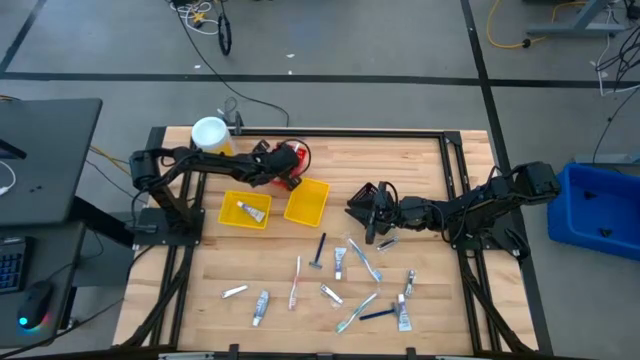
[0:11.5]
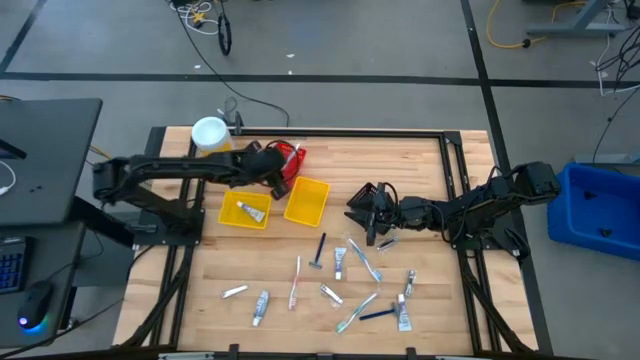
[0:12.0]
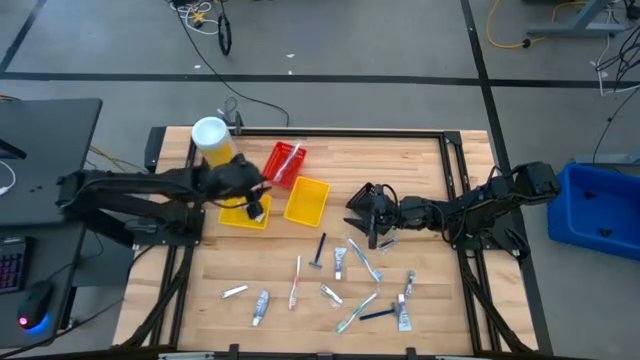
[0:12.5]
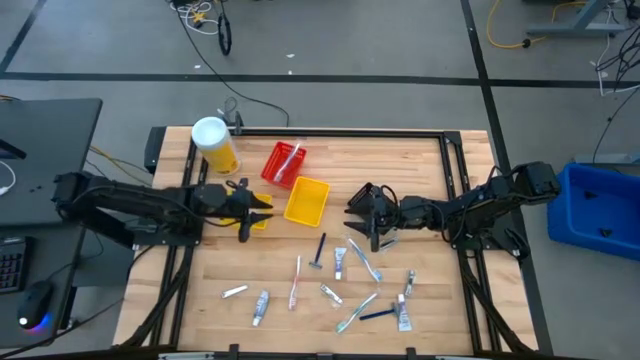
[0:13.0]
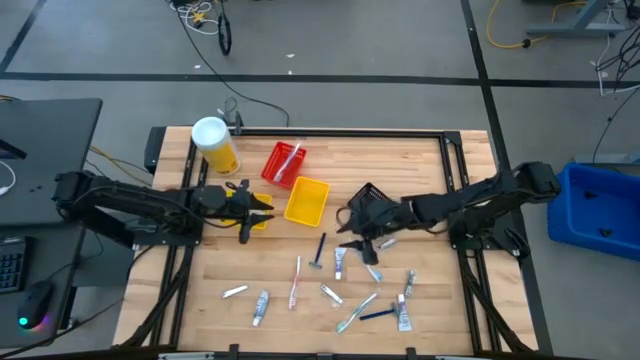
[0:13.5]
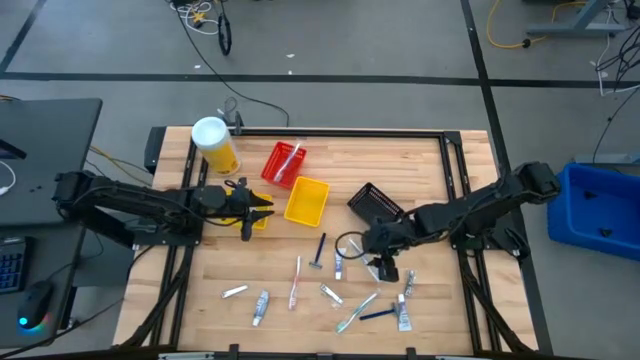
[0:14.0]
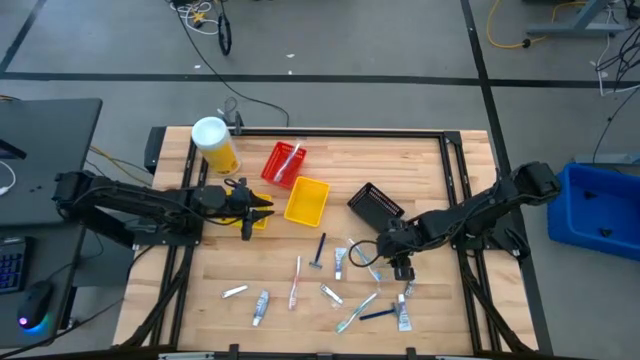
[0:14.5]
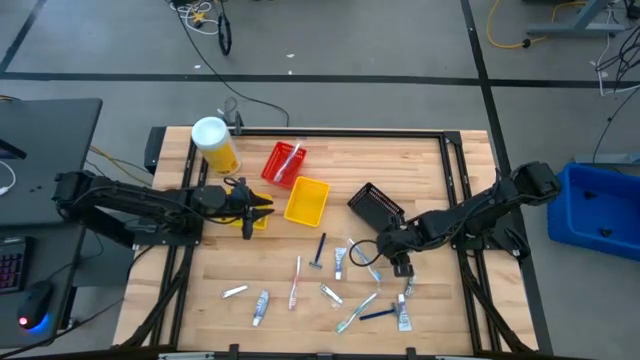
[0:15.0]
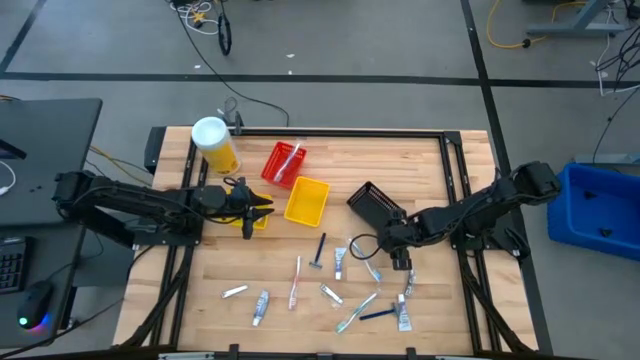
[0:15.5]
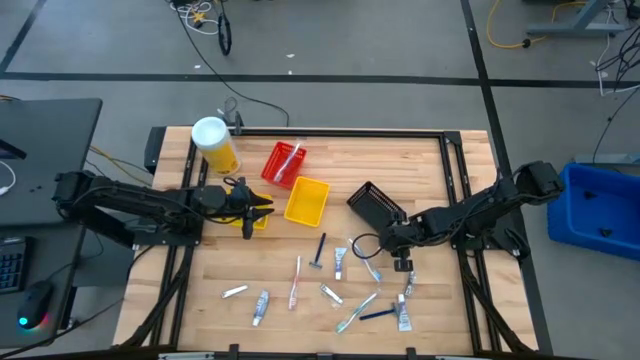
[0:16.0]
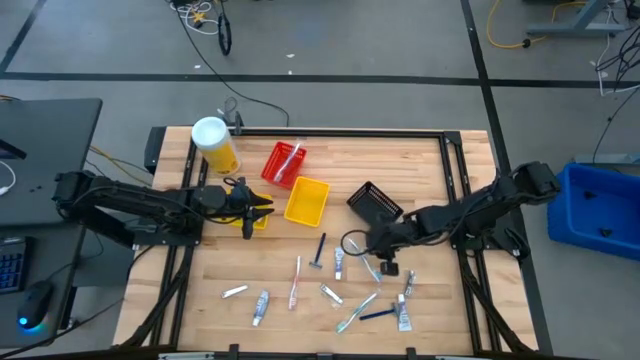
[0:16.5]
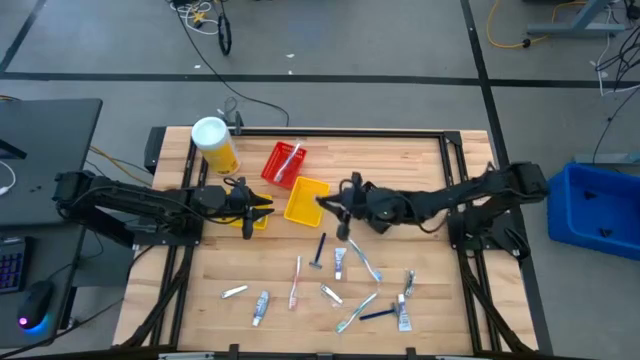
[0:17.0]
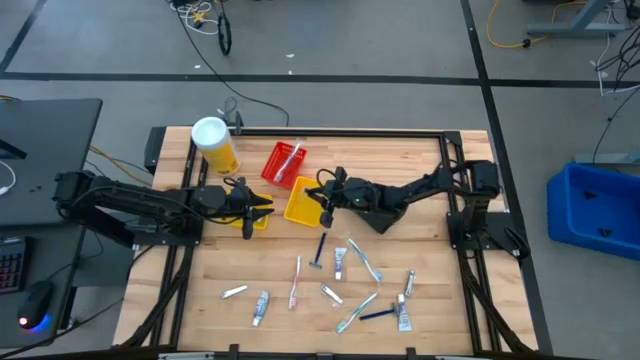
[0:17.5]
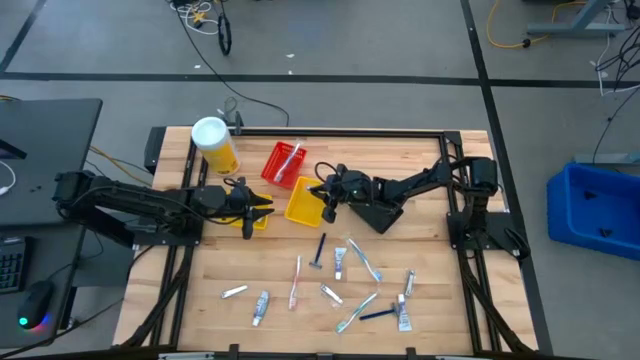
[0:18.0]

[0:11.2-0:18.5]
Task: Pick & Place Travel size toiletries
Put the silver nail cutter into the right yellow bin

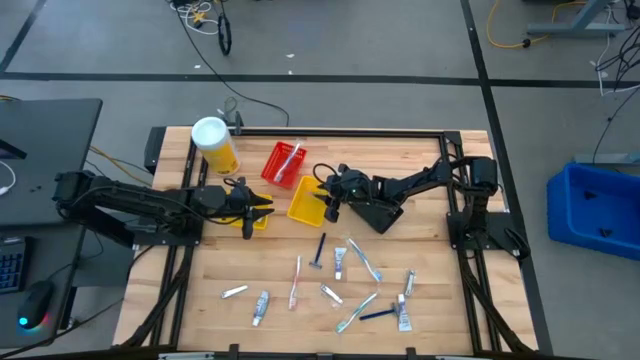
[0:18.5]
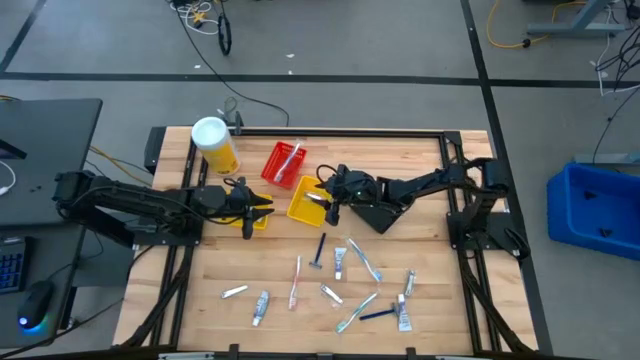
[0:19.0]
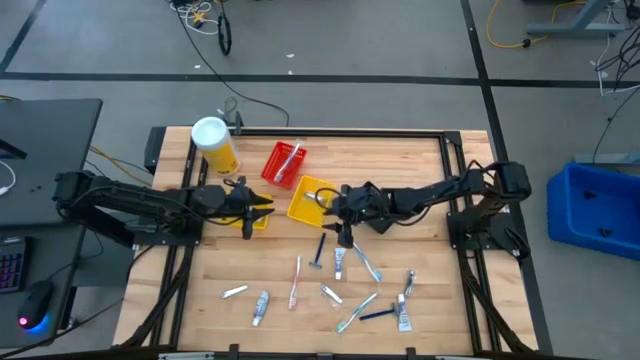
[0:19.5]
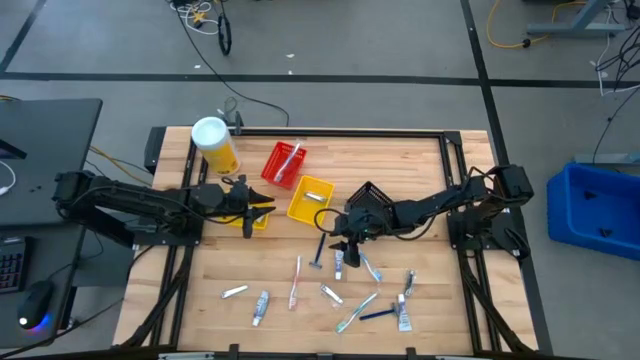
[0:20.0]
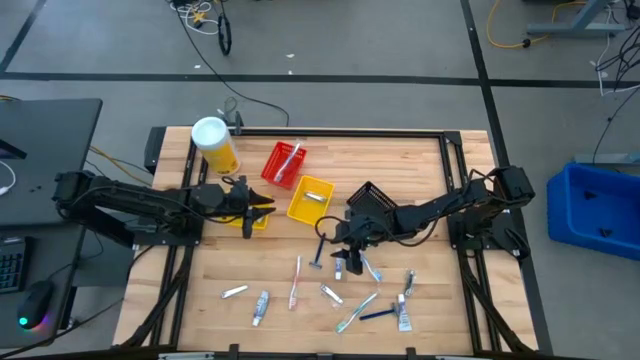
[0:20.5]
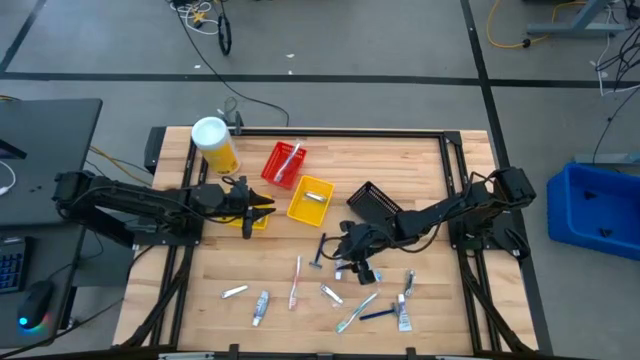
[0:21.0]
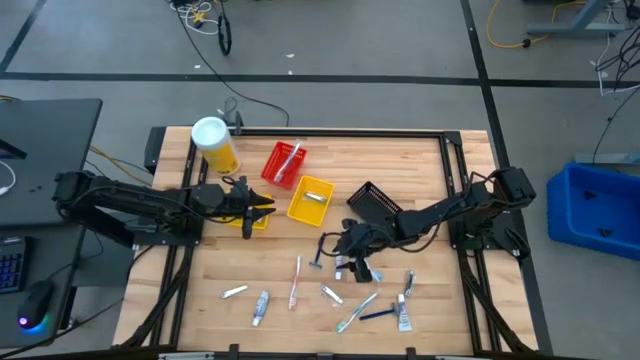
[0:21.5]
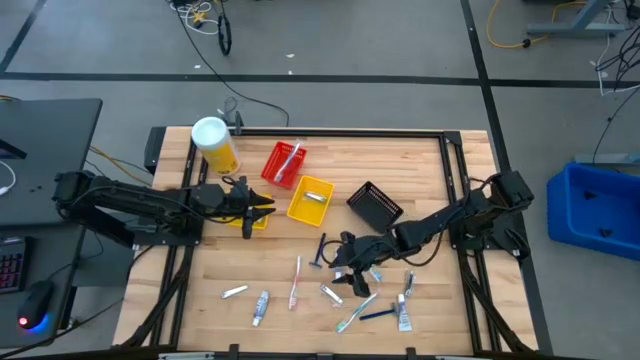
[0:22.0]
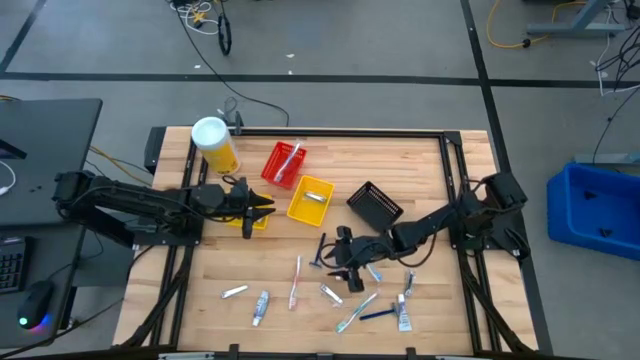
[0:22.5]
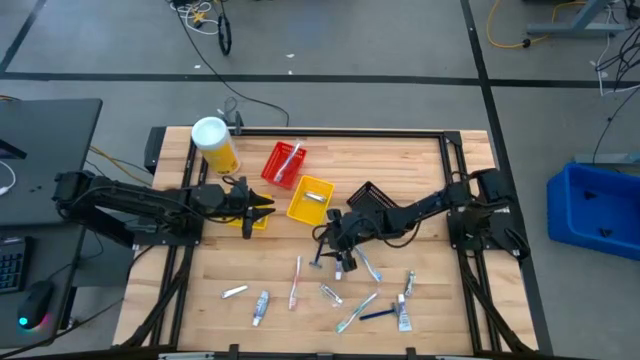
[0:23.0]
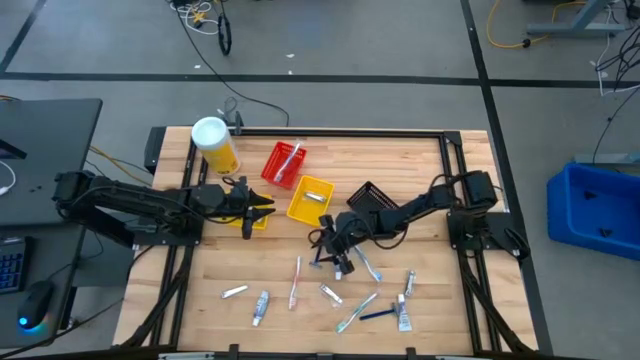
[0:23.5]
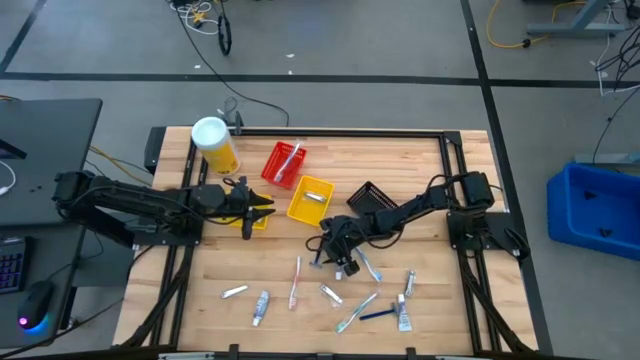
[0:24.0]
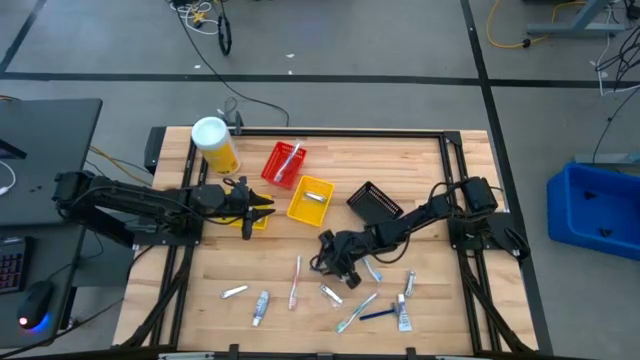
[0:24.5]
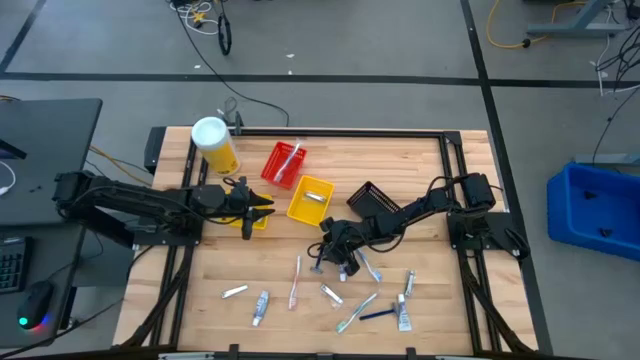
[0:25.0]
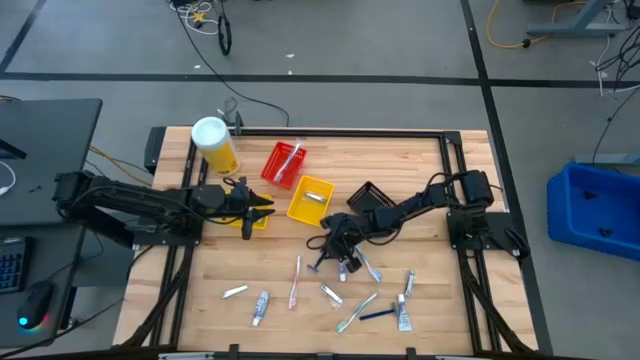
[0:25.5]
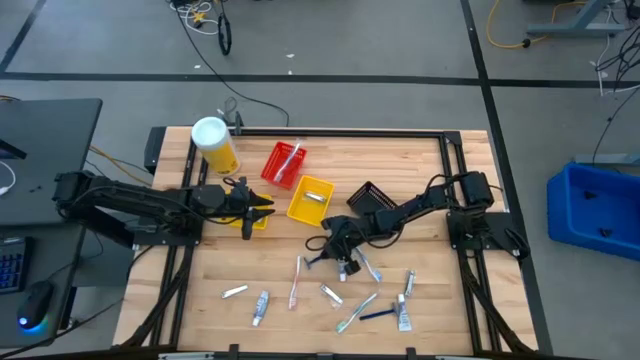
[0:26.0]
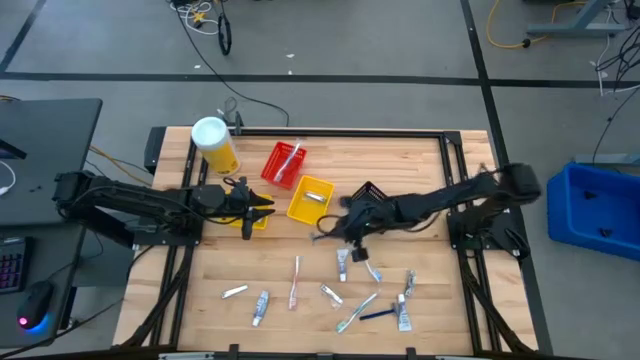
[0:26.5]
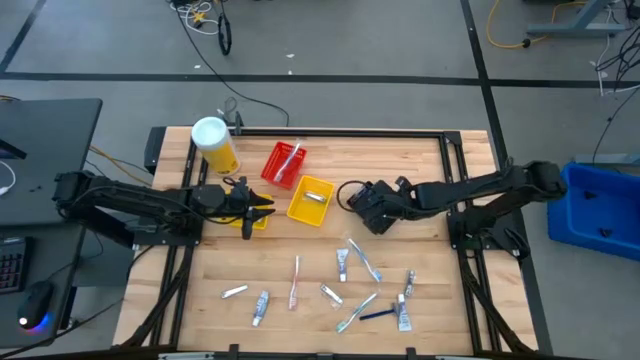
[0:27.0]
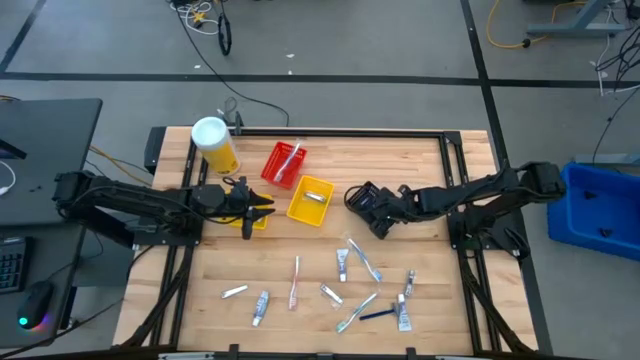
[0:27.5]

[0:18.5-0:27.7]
Put the blue razor into the black bin

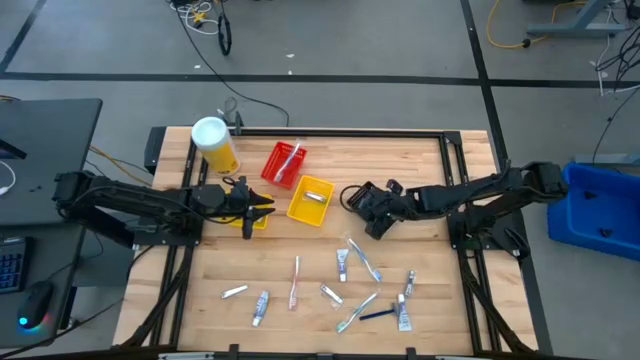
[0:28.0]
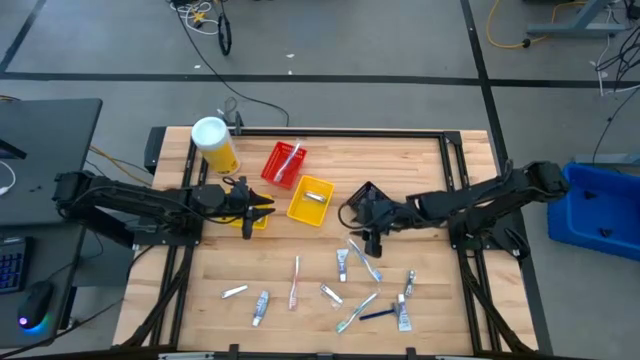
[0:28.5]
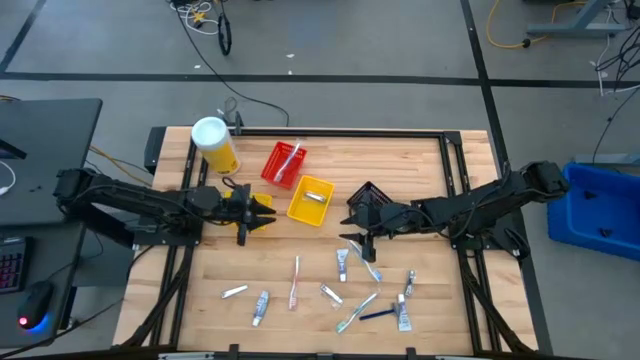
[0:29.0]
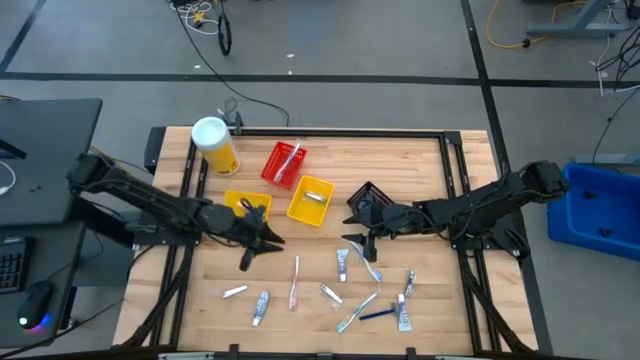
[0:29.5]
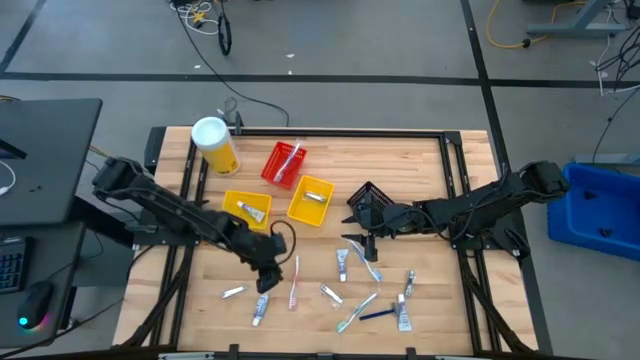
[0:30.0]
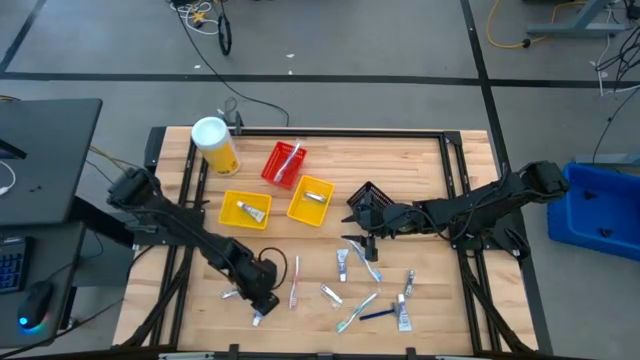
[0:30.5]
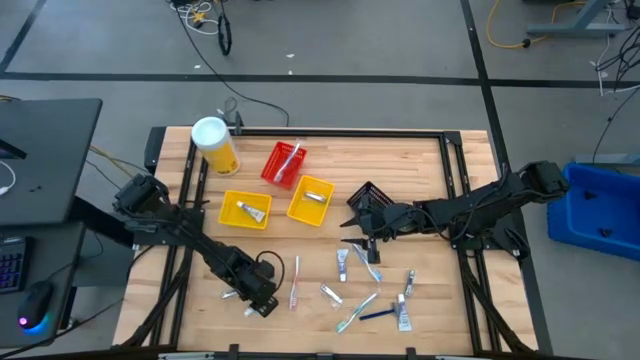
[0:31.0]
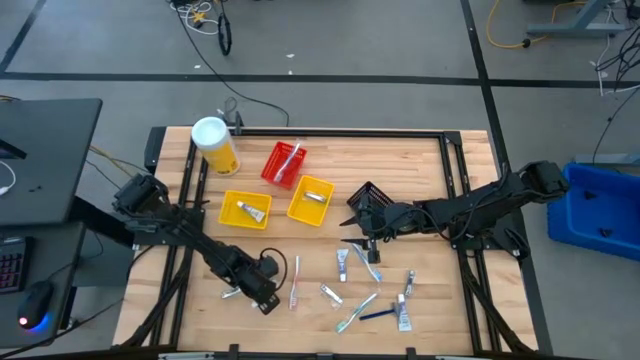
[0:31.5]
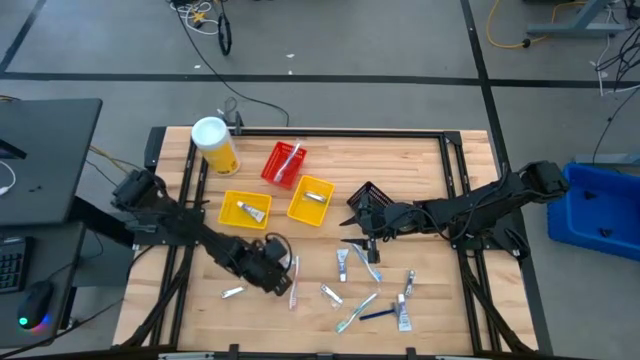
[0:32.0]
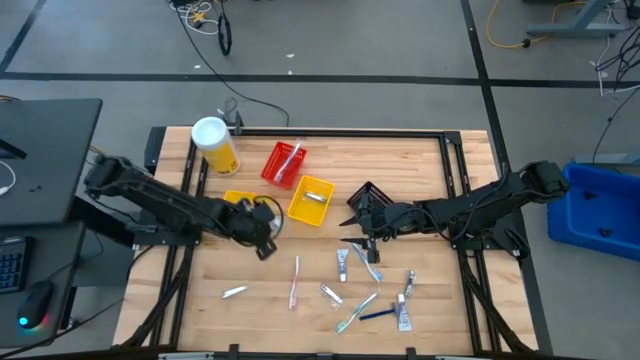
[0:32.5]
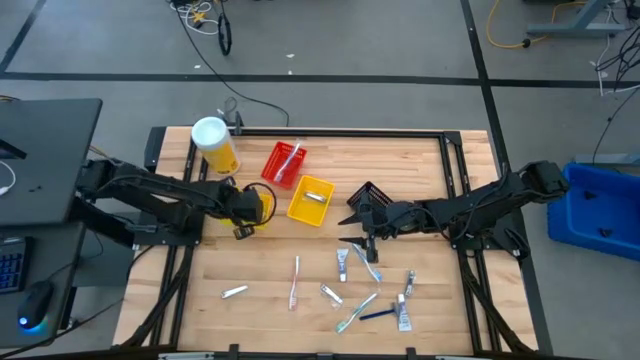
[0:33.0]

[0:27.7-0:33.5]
Put the white toothpaste into the left yellow bin
